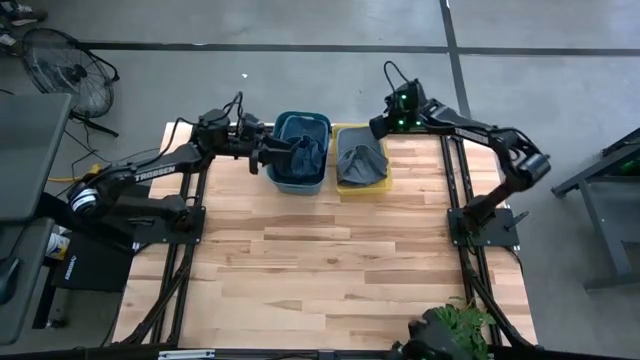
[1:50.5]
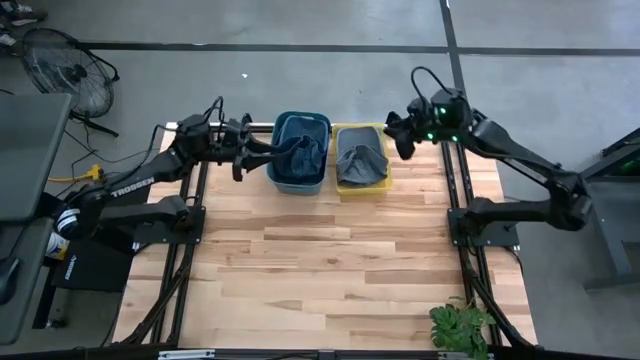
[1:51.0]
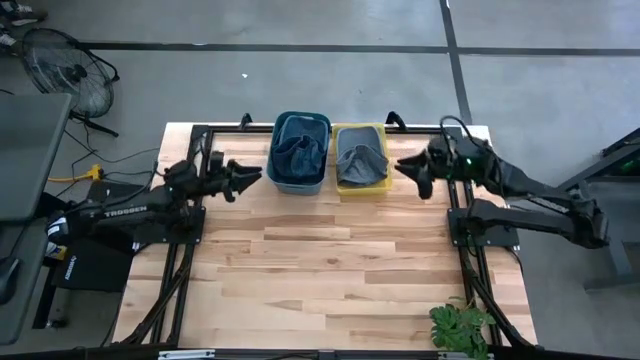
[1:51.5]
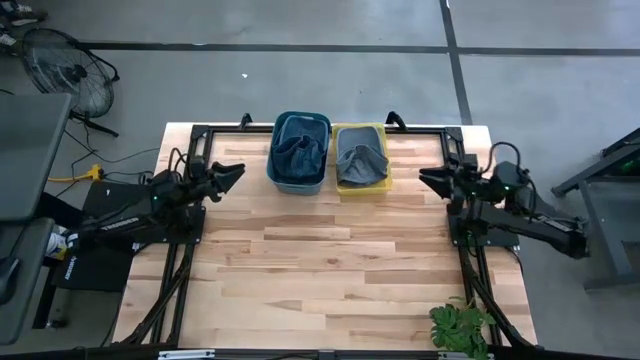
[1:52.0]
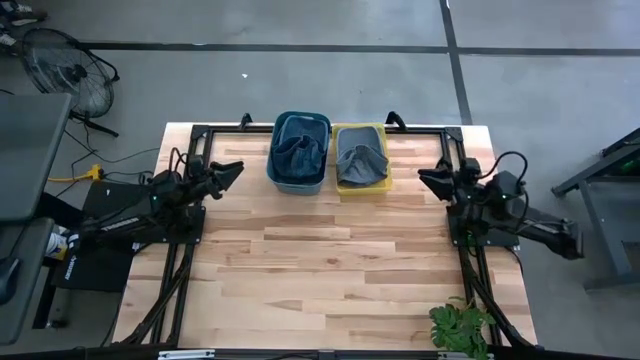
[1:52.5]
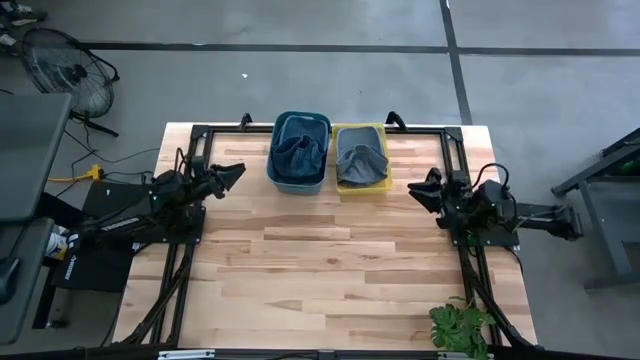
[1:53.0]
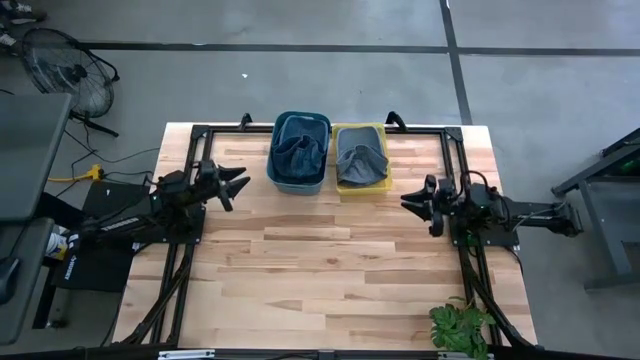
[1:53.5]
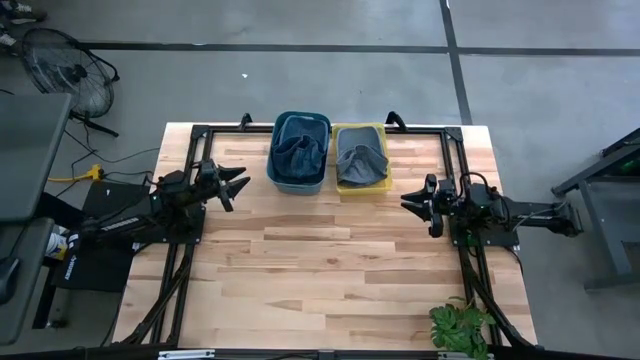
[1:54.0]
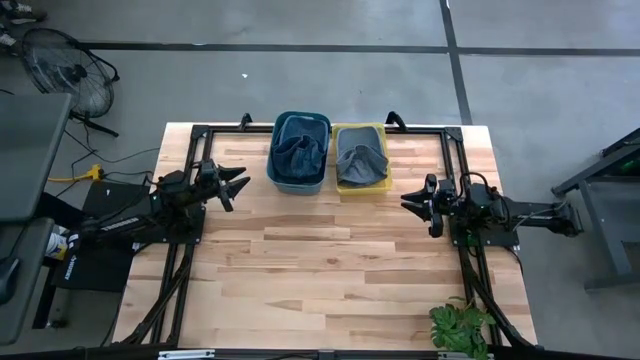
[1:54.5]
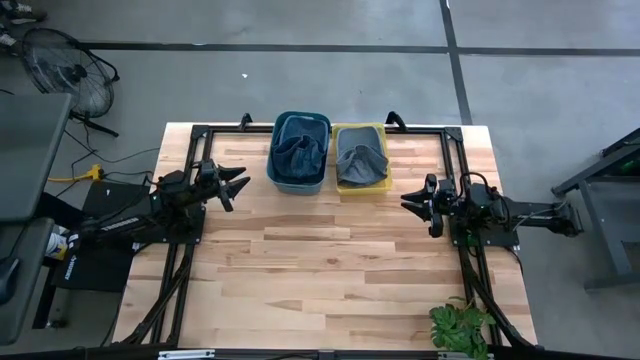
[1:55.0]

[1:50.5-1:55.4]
Task: Pick & Place hat
Return to Home Position

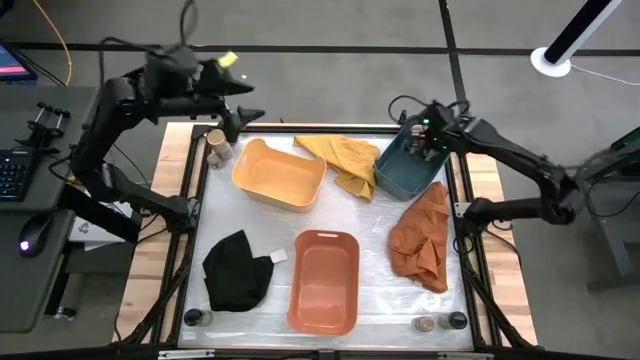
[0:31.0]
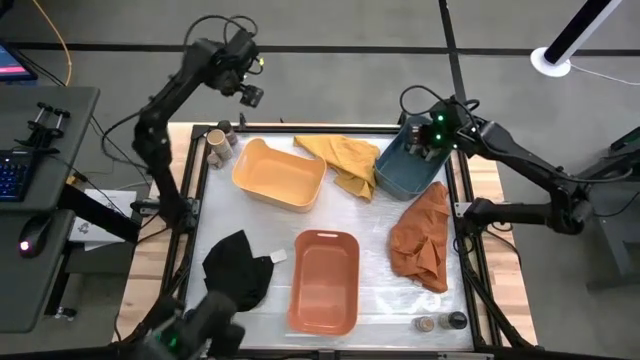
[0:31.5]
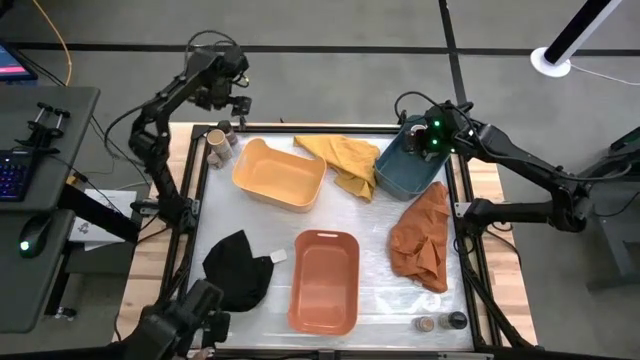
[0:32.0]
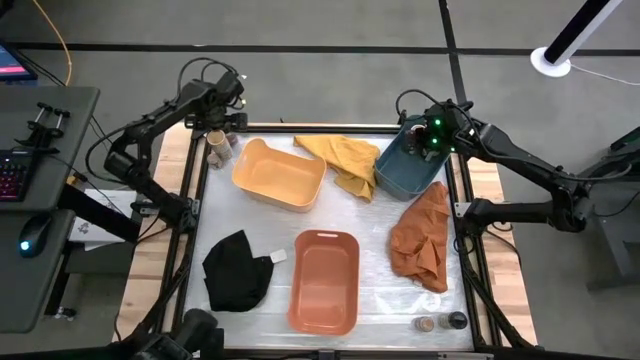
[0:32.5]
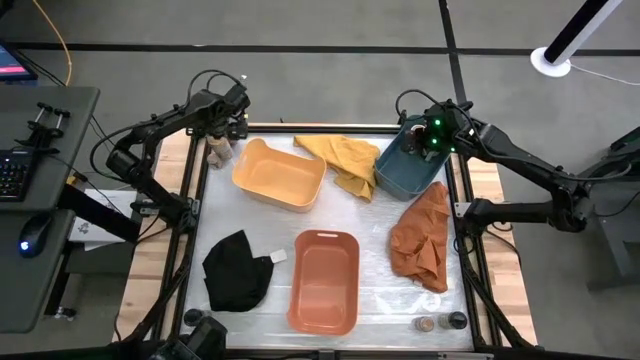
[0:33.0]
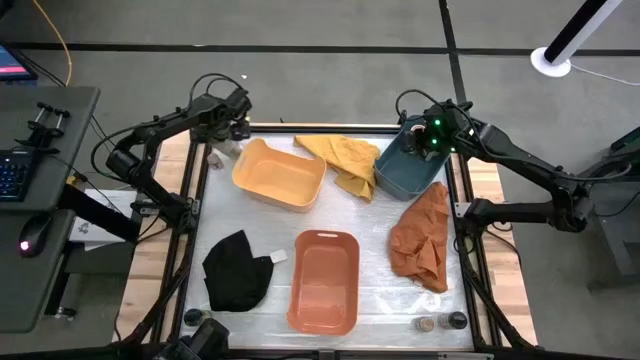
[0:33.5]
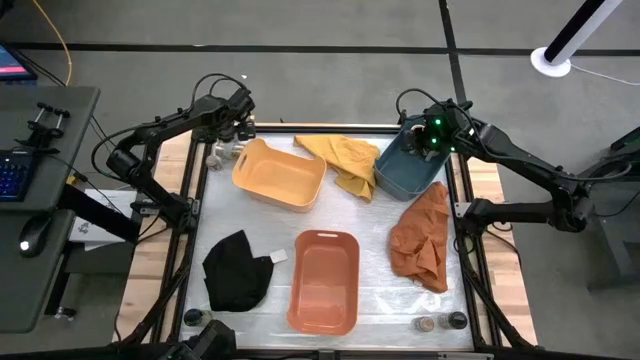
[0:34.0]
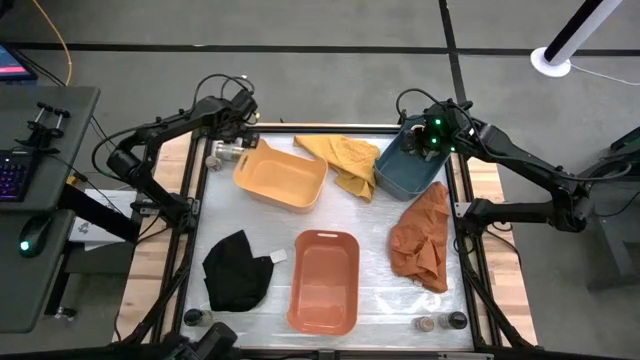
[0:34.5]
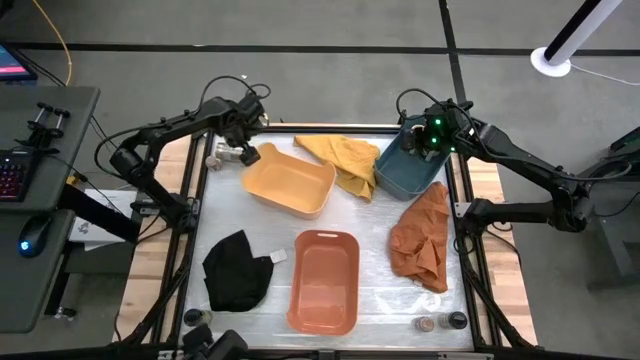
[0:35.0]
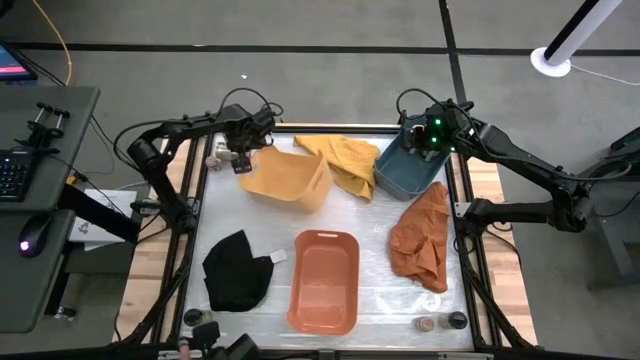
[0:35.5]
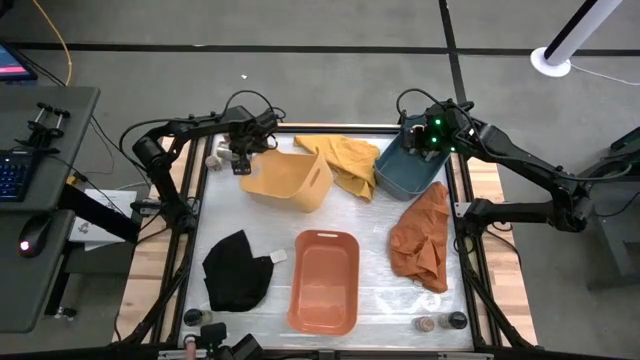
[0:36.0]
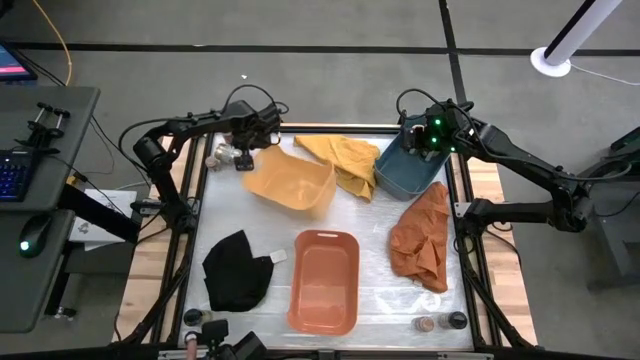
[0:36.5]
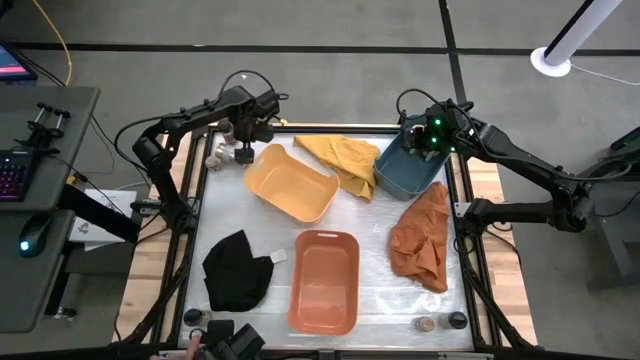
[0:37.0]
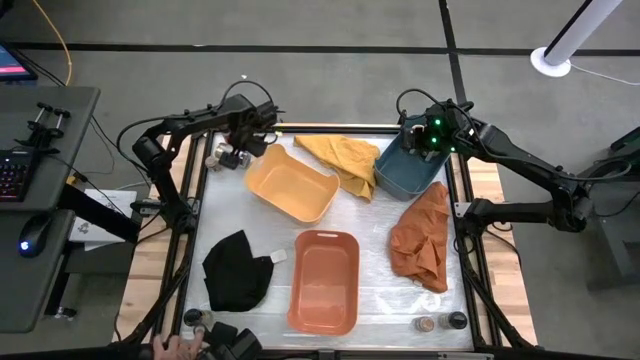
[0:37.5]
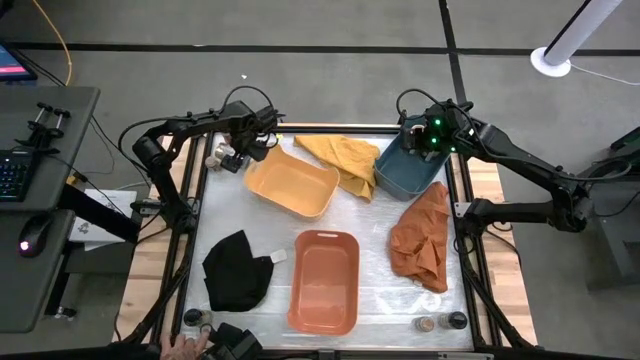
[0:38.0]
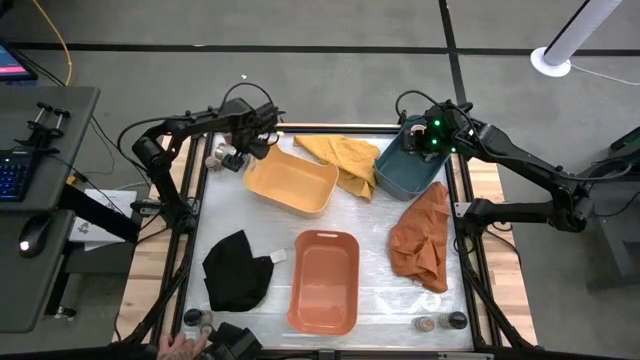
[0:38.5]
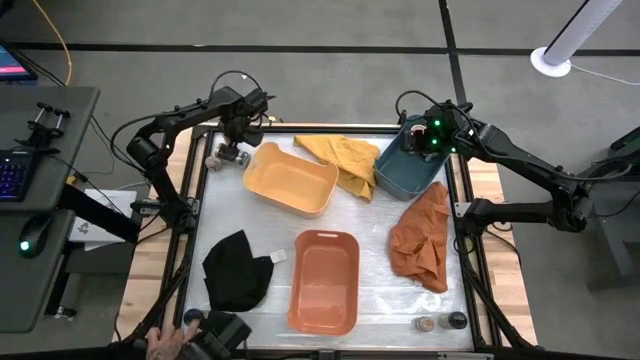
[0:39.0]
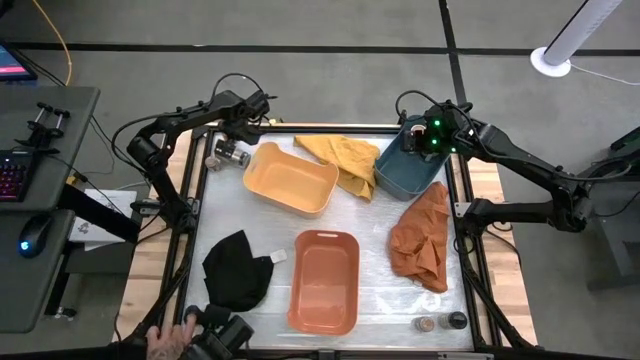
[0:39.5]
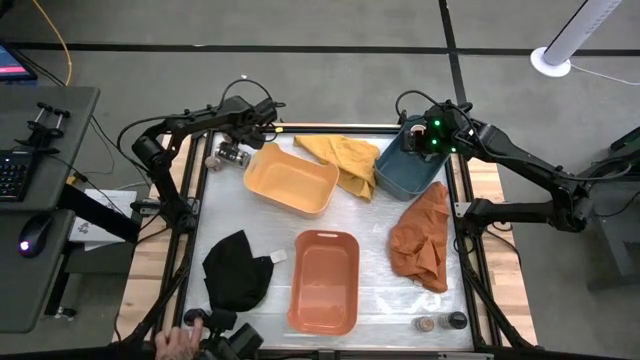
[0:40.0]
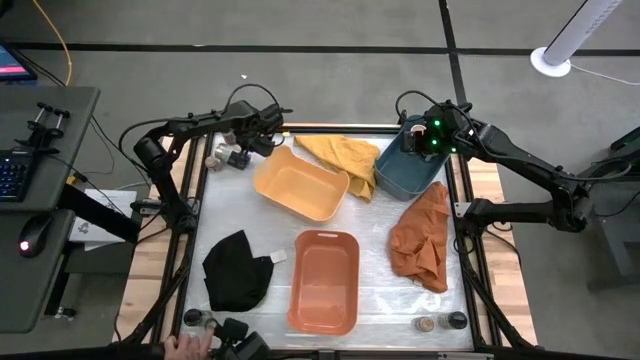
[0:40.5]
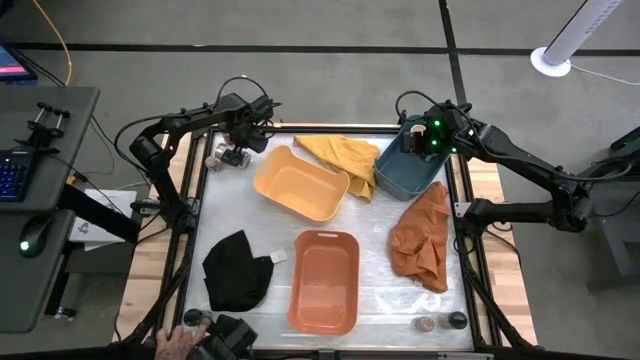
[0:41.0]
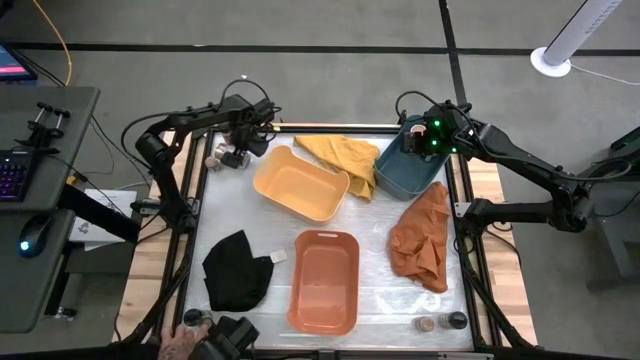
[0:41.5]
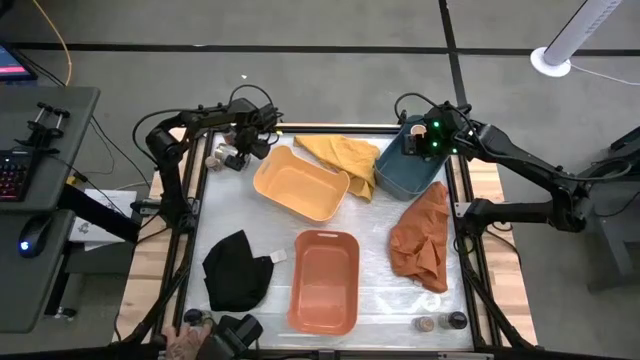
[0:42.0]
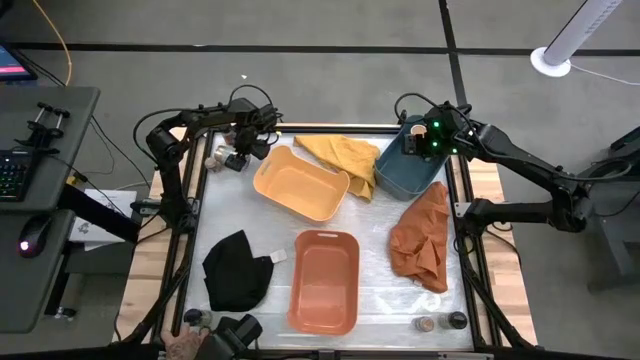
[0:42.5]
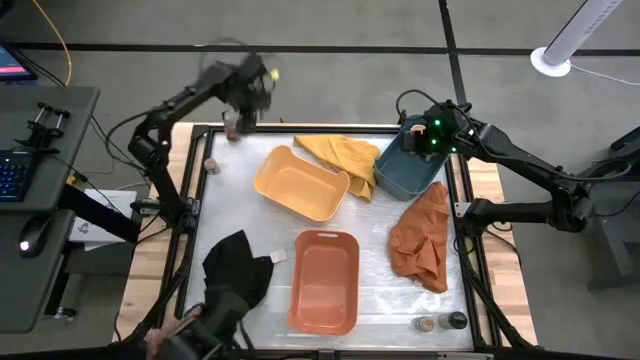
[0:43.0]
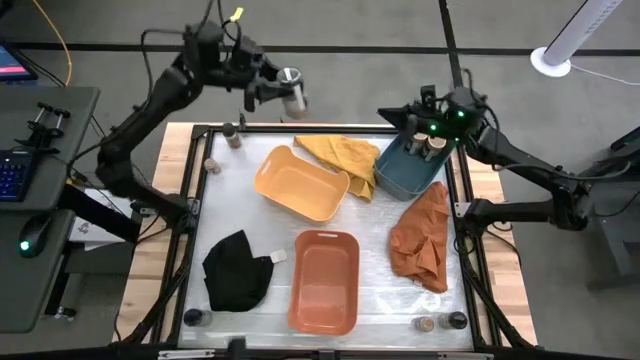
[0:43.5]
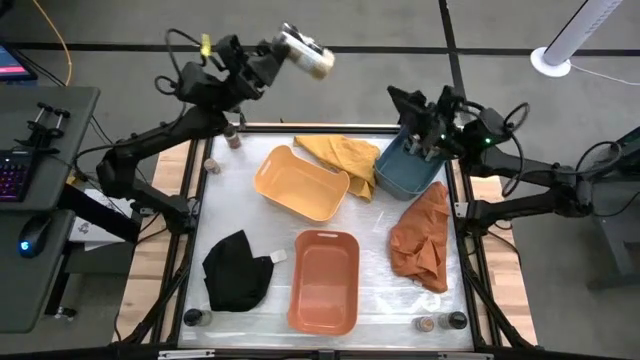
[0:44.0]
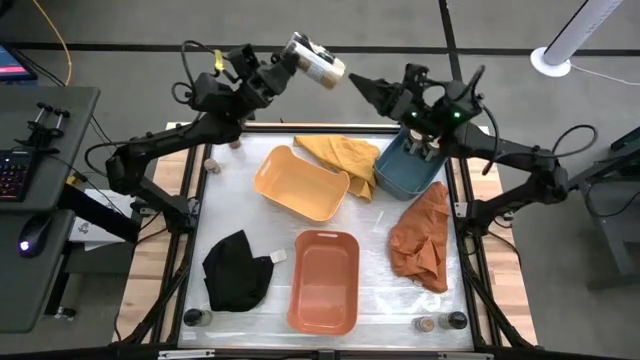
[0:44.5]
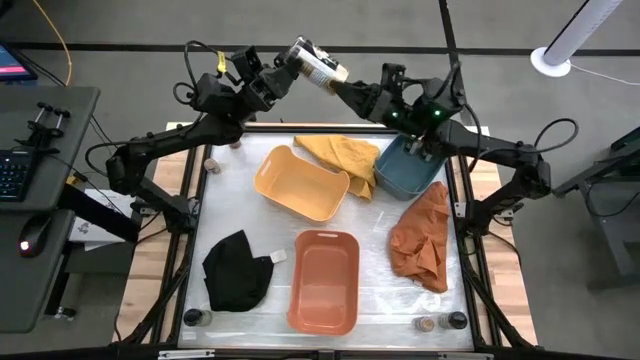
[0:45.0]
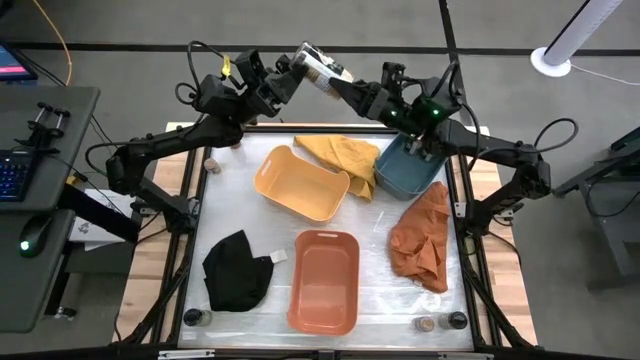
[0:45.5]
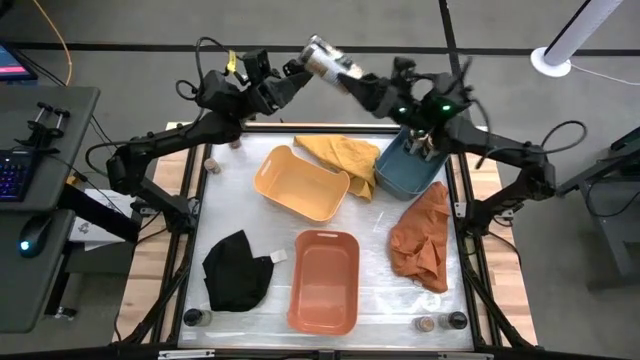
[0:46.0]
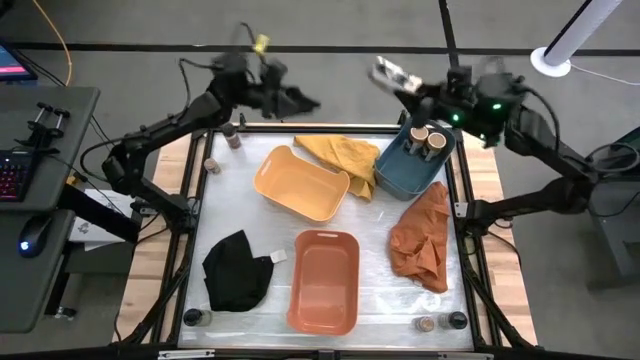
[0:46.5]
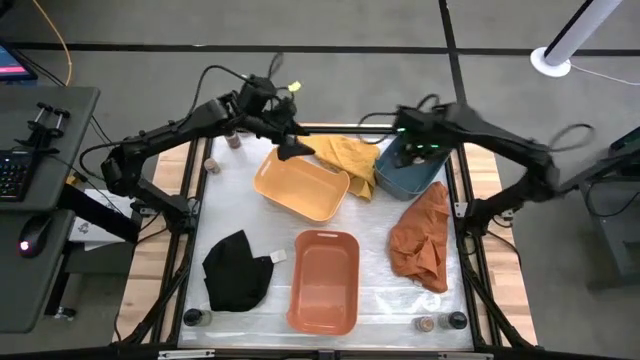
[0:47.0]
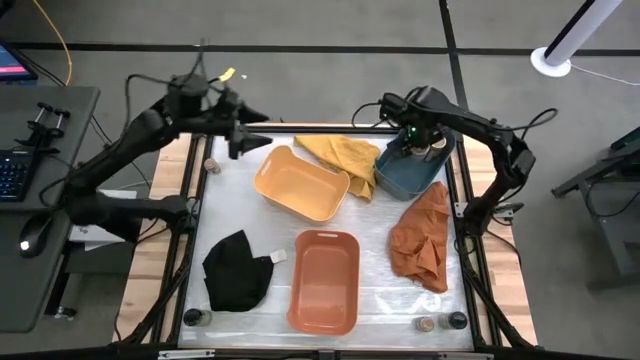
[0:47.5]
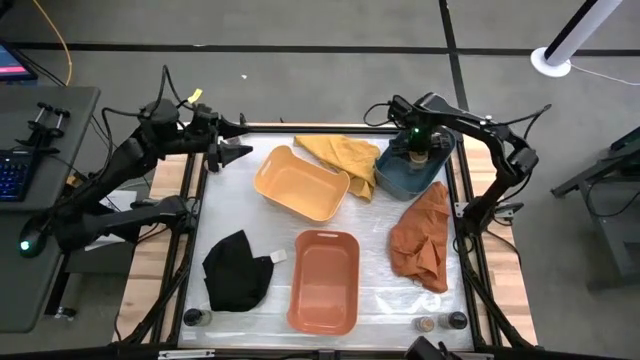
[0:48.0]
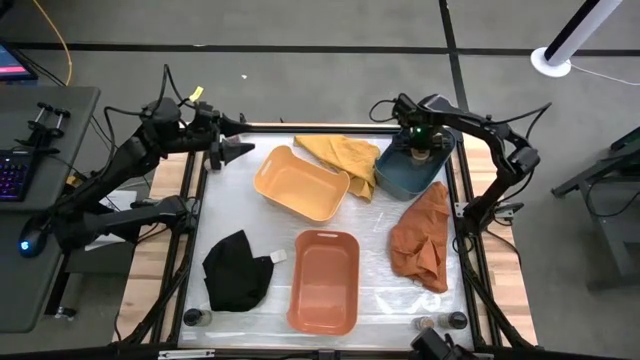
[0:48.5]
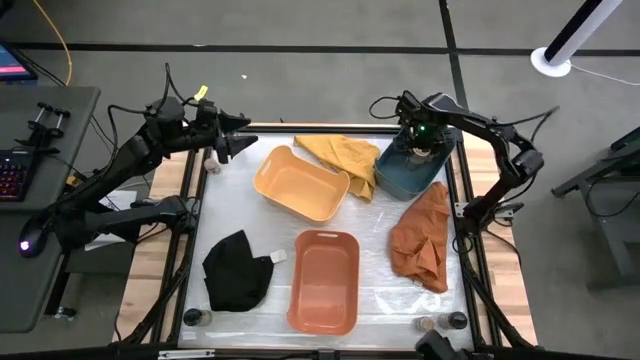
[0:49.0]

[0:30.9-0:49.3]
Task: Sort spices by type
Put the gold seasoning bottle into the blue bin
